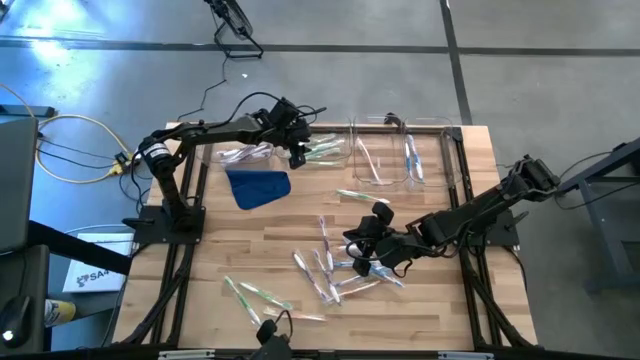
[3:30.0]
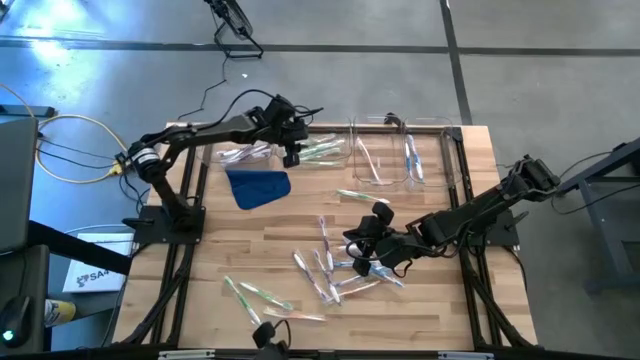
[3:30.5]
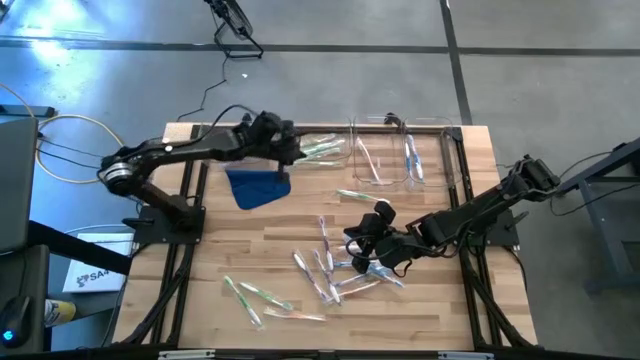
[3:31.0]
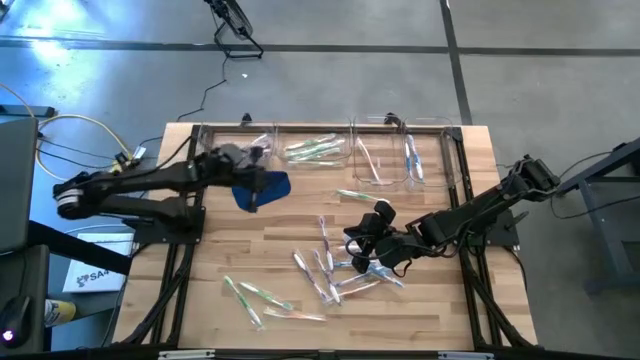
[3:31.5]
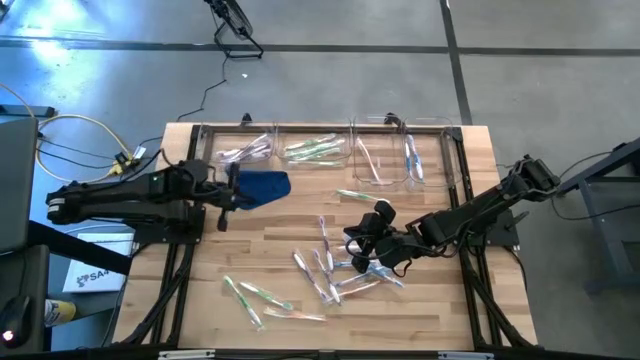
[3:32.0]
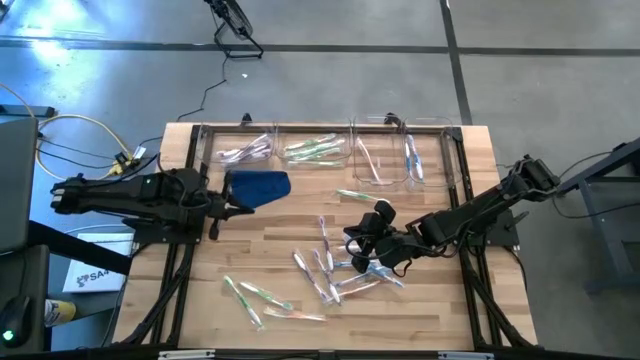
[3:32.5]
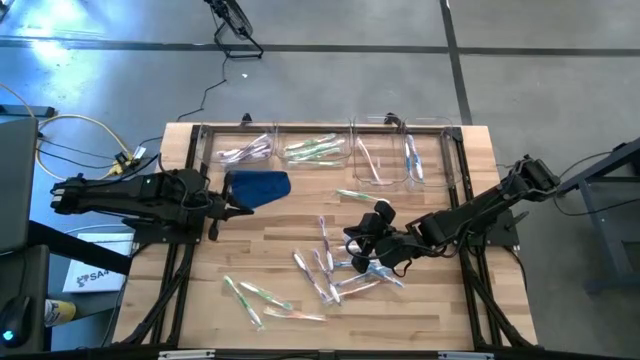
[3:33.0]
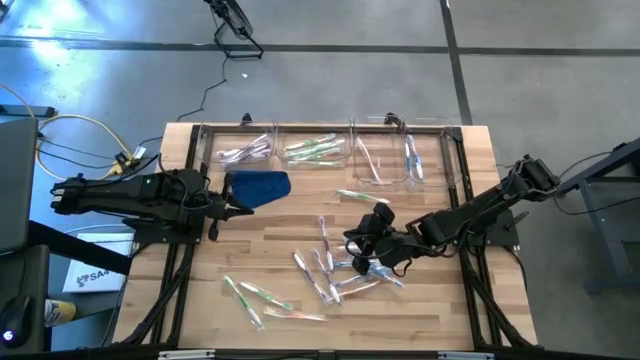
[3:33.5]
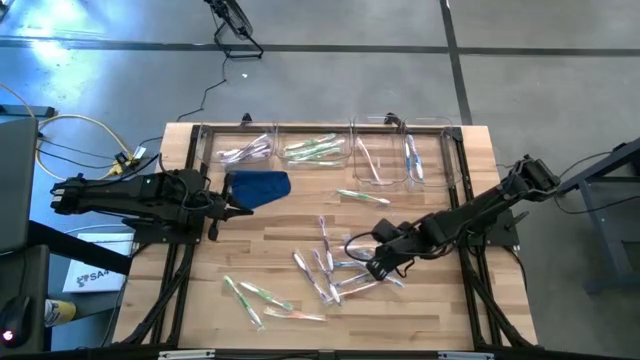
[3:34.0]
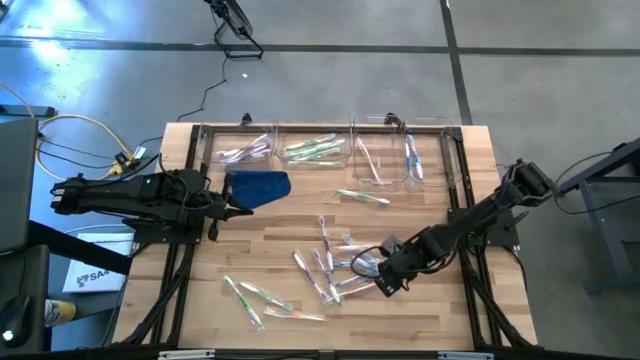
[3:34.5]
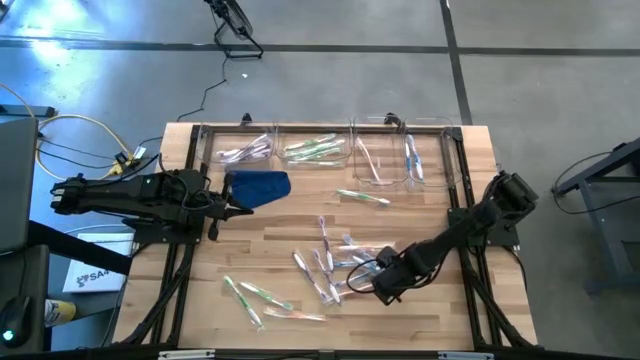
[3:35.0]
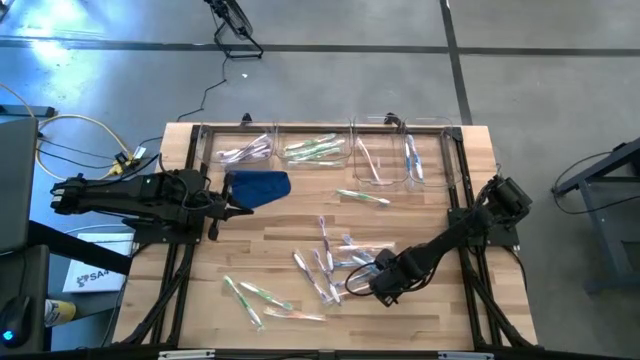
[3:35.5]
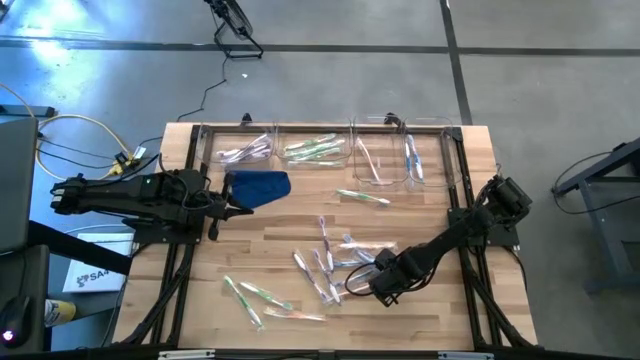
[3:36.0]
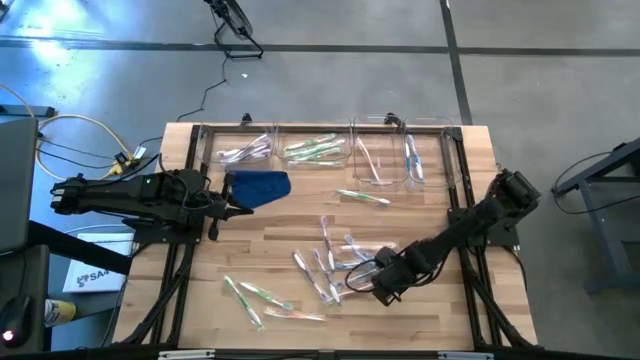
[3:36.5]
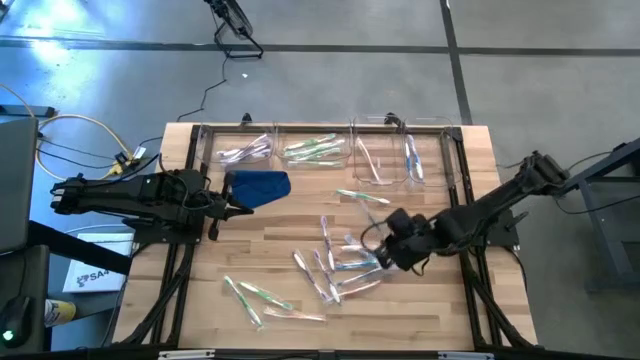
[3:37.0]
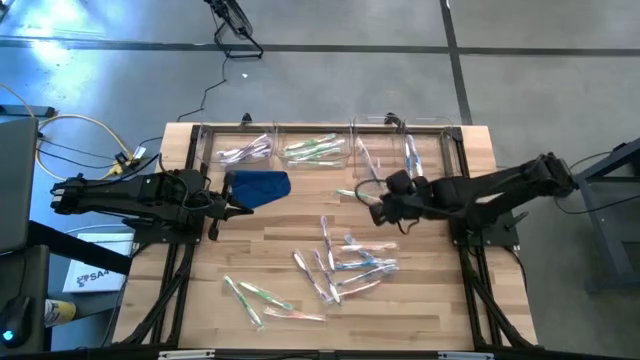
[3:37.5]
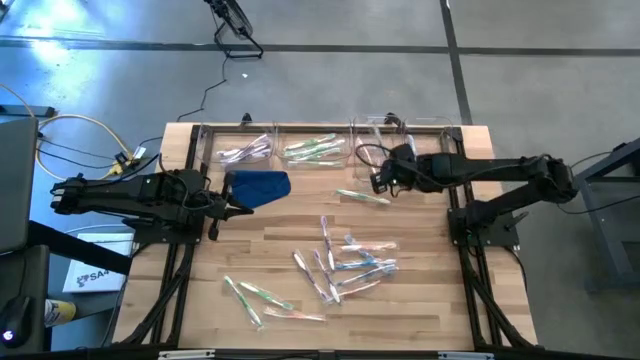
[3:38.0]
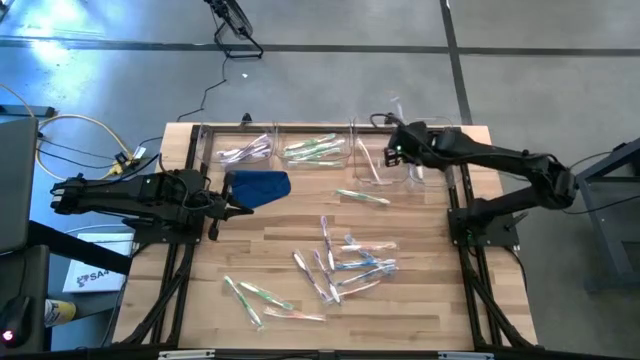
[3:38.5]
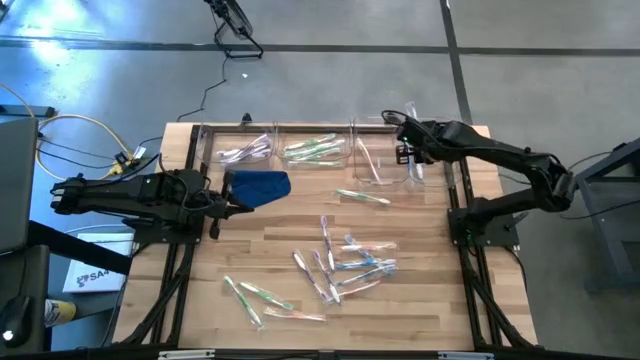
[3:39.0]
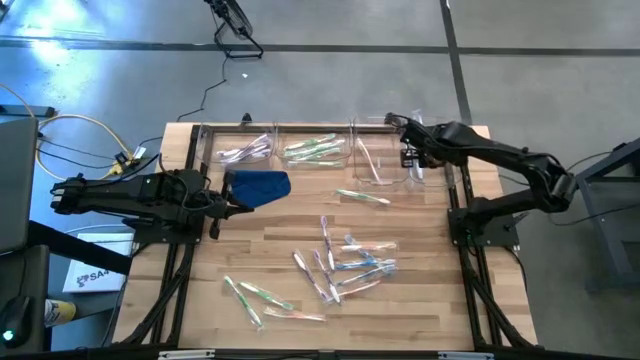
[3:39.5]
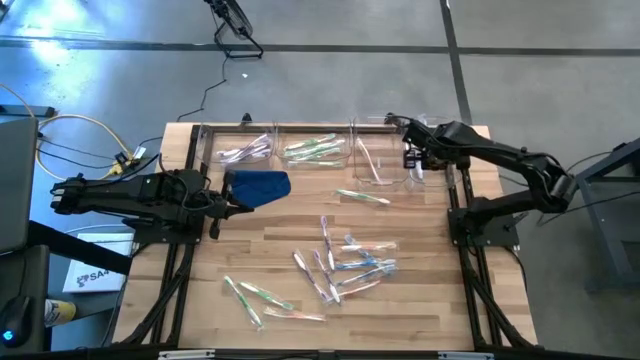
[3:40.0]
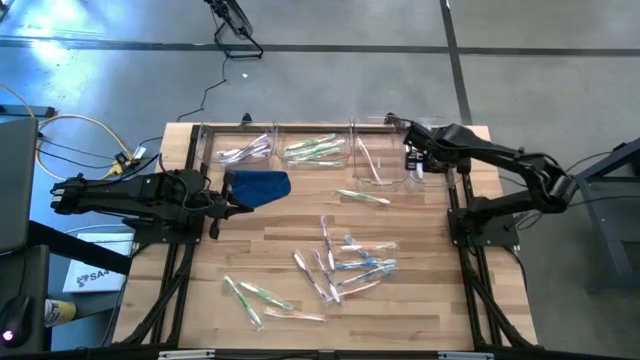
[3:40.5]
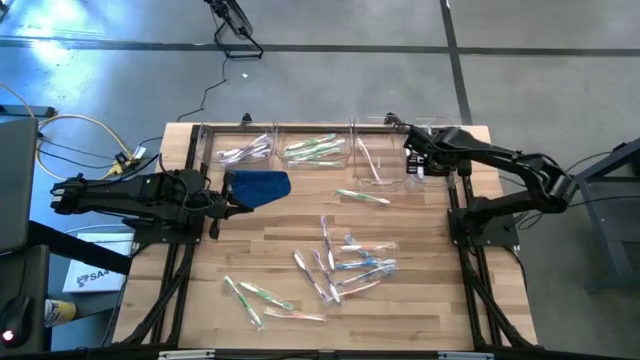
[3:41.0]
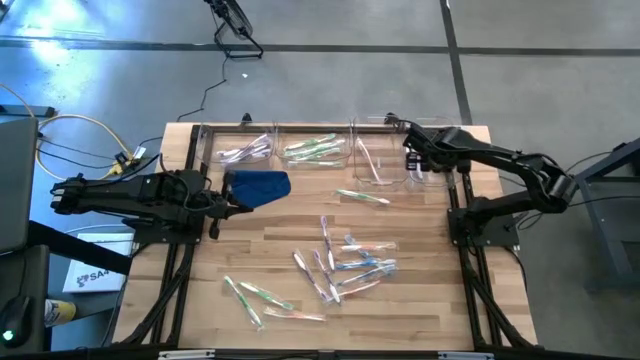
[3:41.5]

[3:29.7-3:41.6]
Task: Pick & Place Toothbrushes
Put the blue toothbrush into the right transparent bin

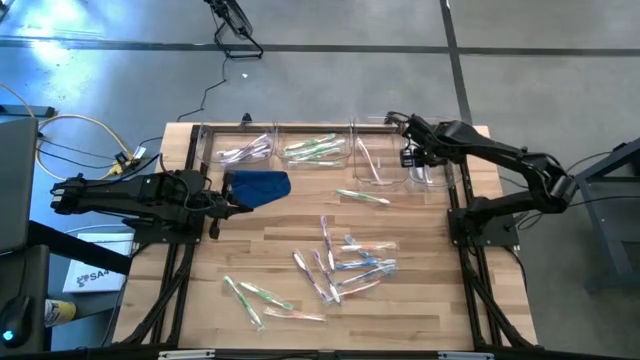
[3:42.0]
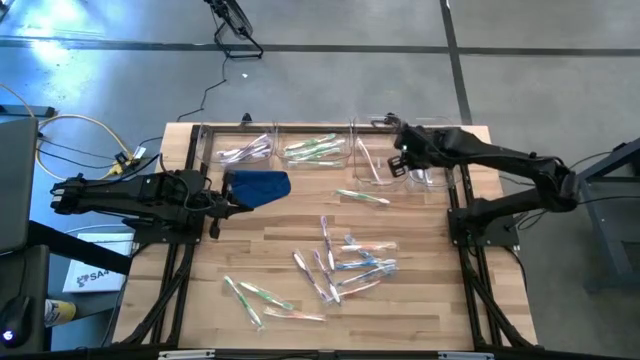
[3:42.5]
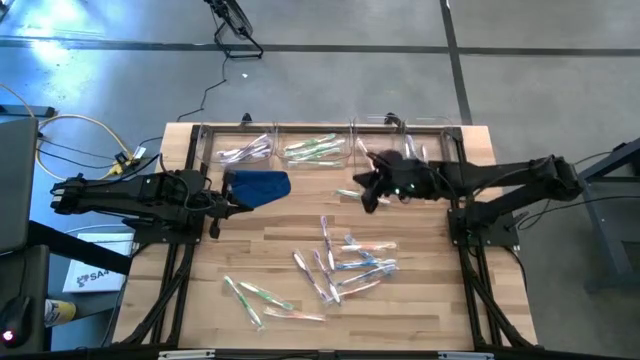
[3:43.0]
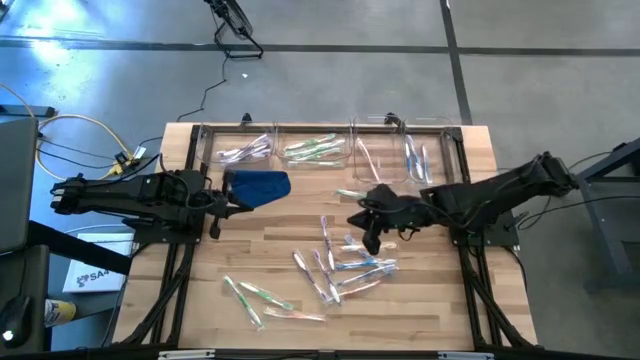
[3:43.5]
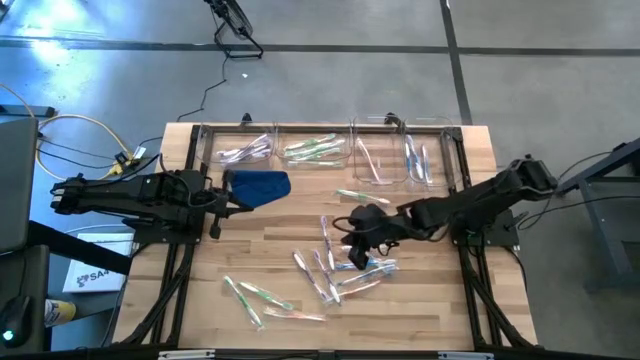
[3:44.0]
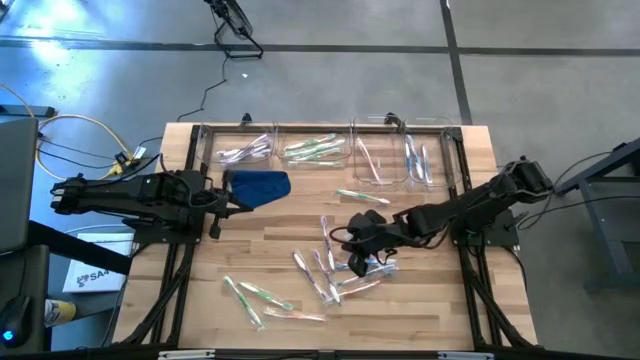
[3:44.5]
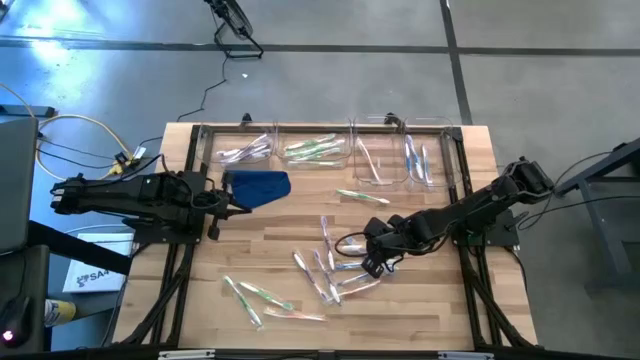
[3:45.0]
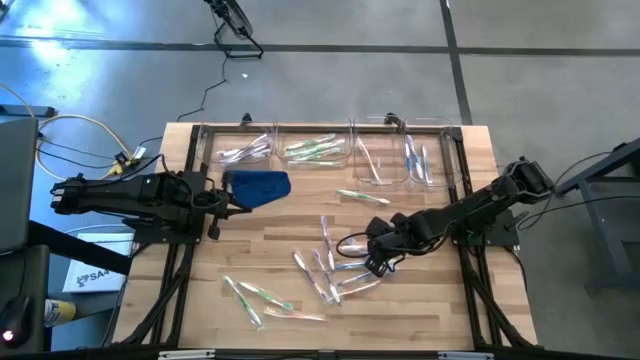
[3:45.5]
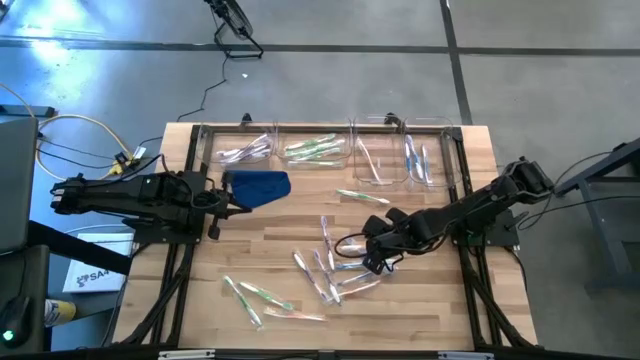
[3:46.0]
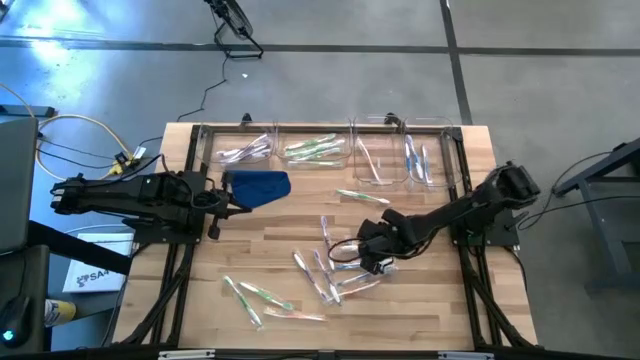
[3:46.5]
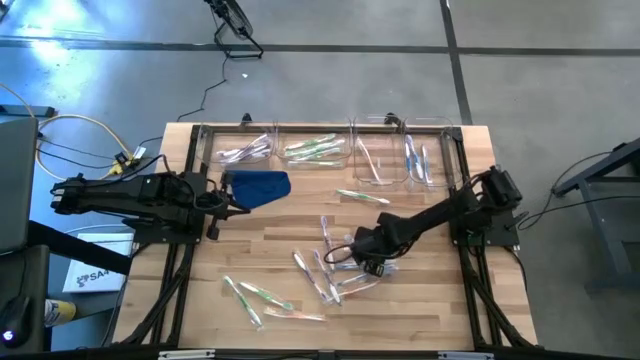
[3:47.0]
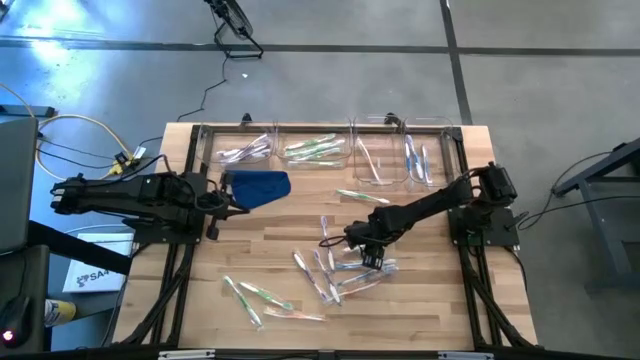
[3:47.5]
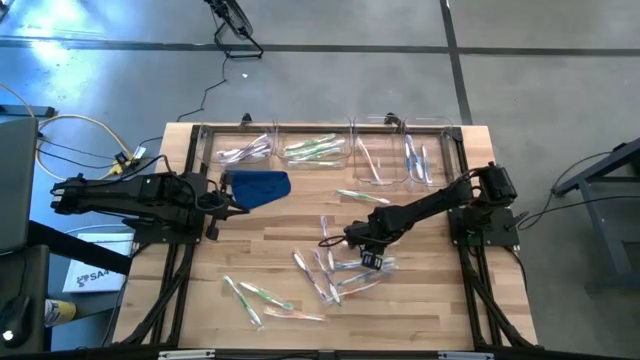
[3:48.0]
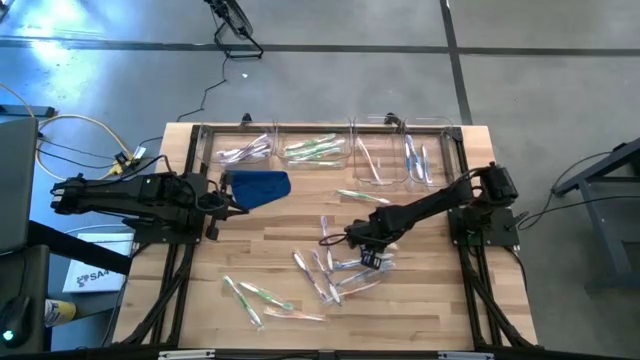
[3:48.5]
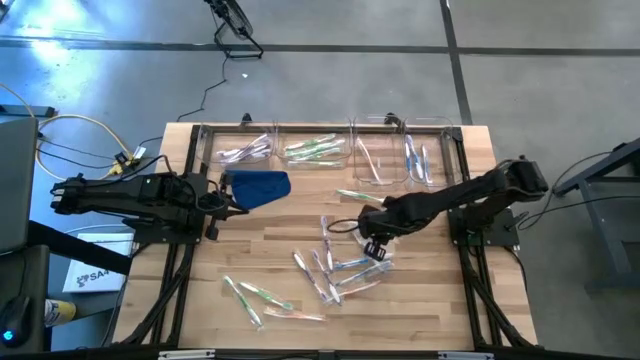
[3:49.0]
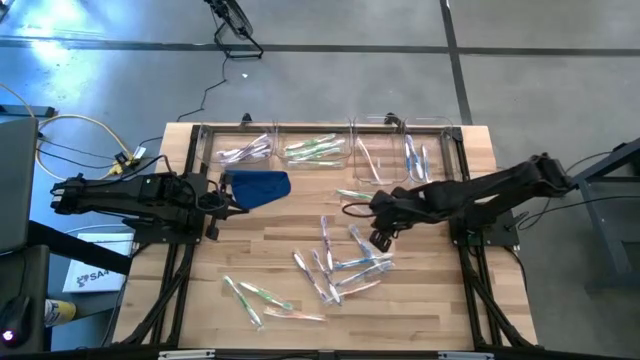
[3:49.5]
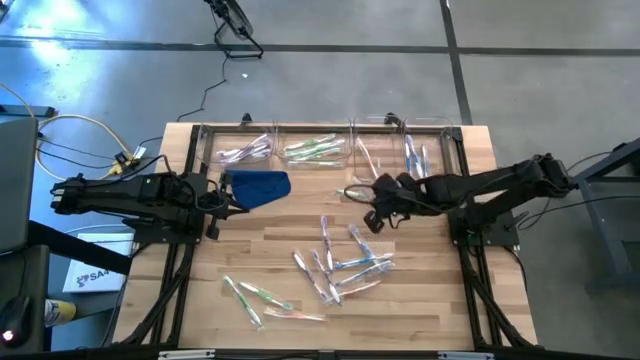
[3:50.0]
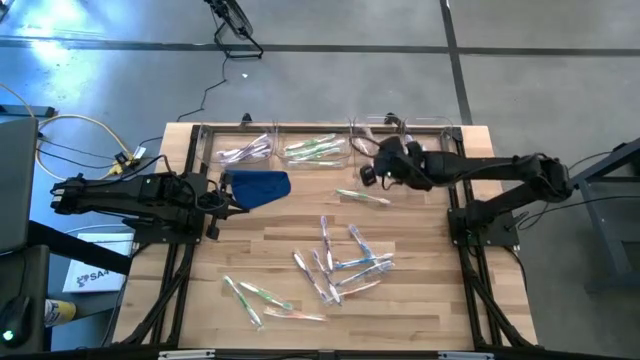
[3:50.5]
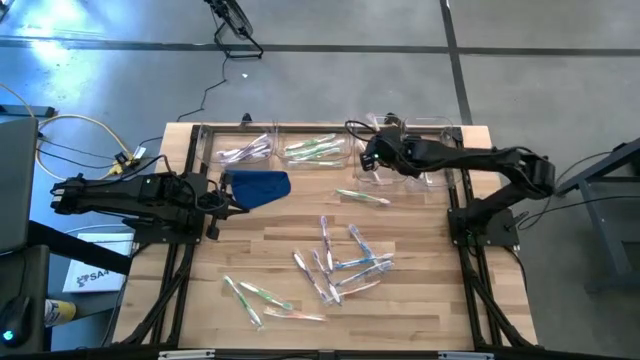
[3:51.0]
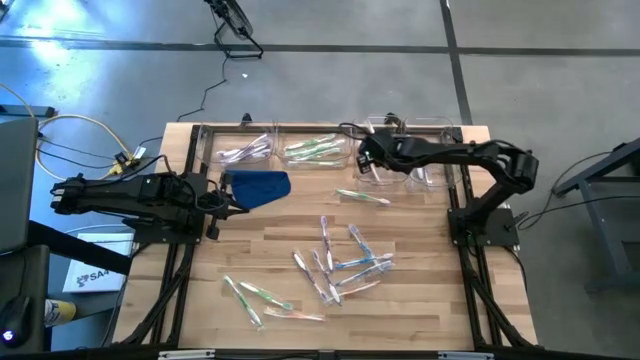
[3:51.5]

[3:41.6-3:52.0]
Put the orange toothbrush into the middle right transparent bin
